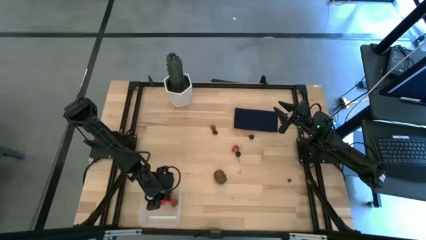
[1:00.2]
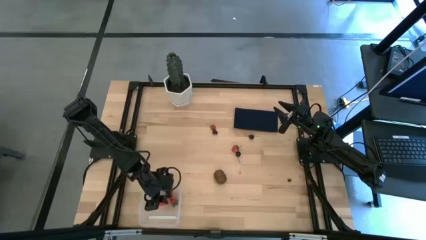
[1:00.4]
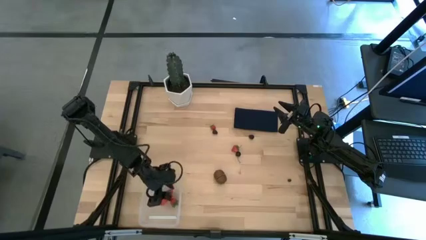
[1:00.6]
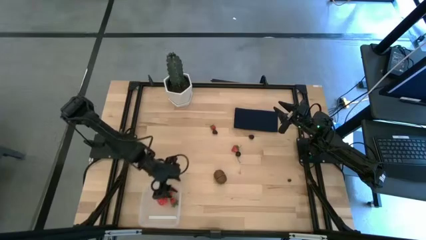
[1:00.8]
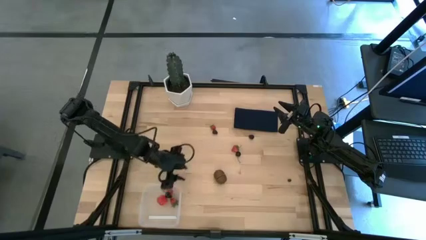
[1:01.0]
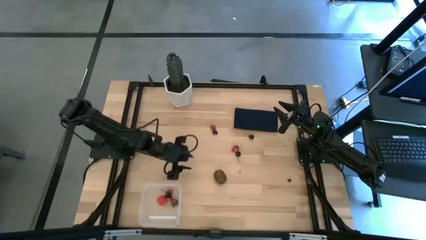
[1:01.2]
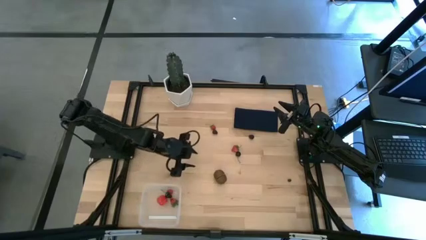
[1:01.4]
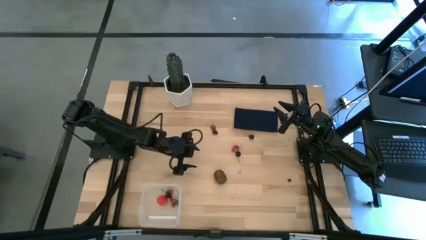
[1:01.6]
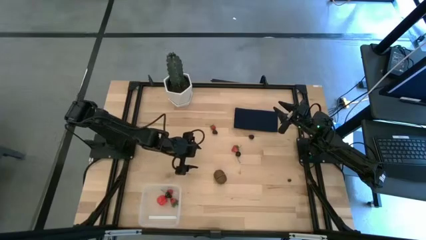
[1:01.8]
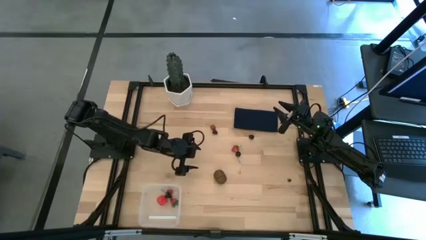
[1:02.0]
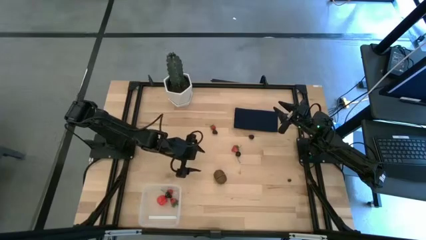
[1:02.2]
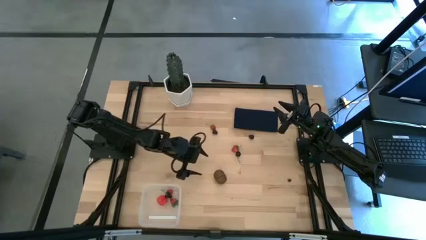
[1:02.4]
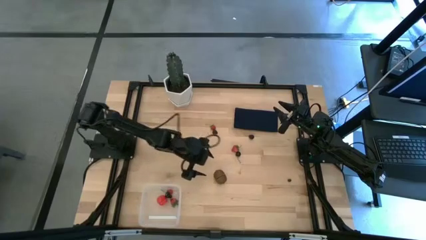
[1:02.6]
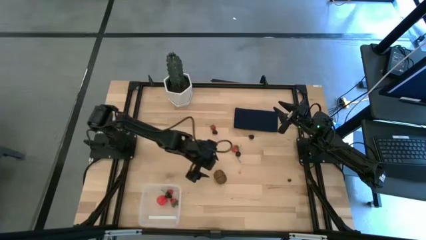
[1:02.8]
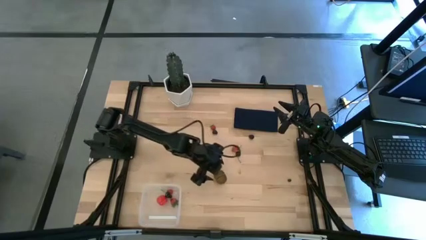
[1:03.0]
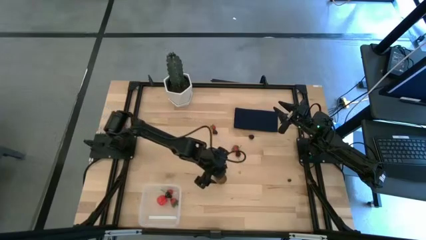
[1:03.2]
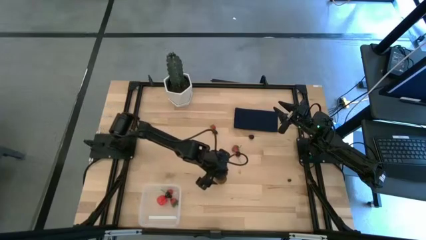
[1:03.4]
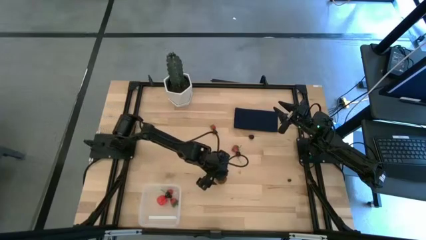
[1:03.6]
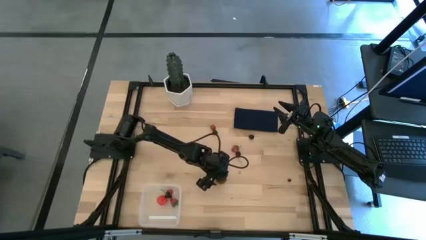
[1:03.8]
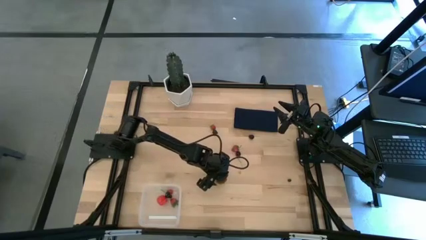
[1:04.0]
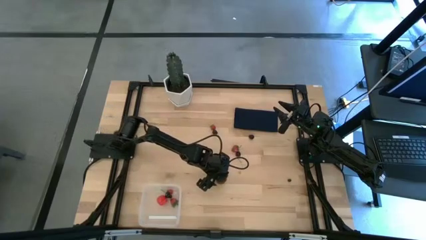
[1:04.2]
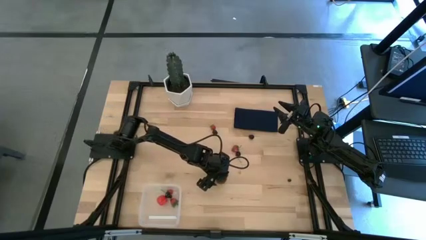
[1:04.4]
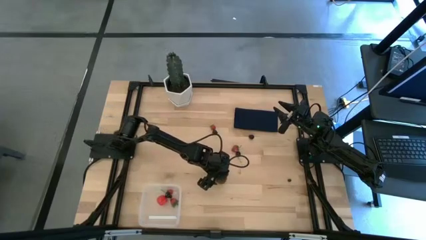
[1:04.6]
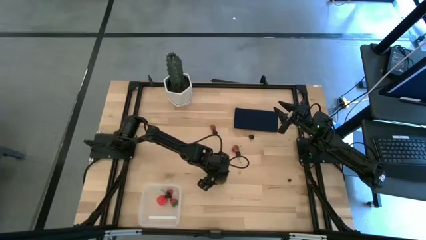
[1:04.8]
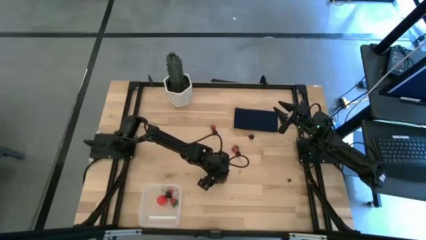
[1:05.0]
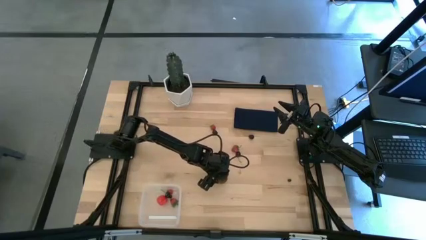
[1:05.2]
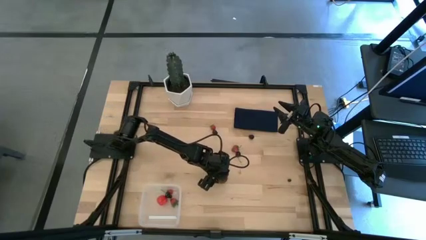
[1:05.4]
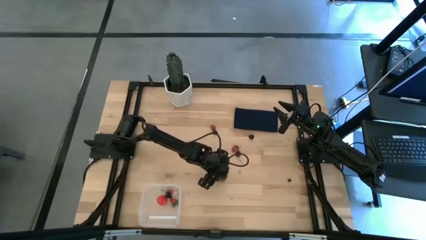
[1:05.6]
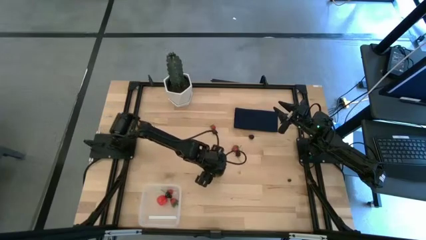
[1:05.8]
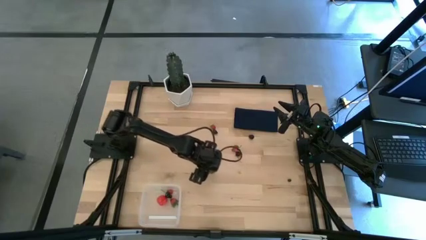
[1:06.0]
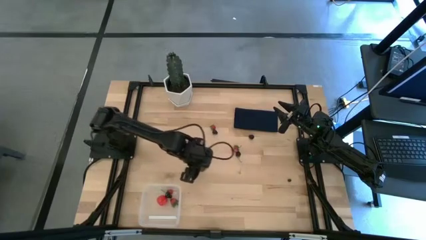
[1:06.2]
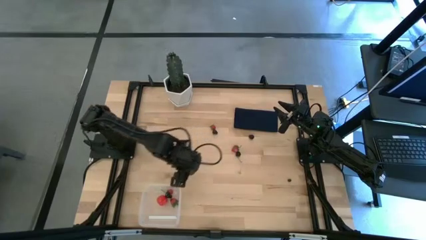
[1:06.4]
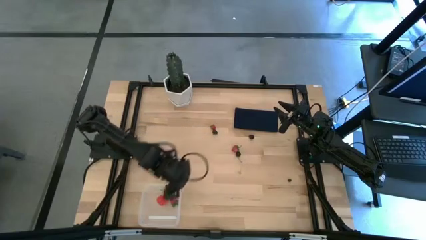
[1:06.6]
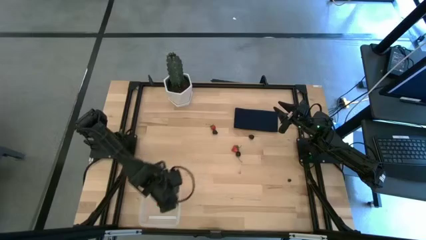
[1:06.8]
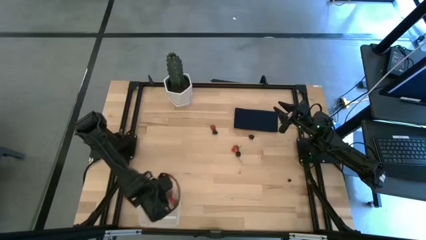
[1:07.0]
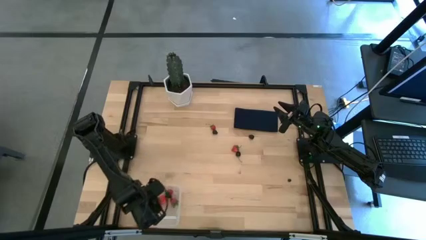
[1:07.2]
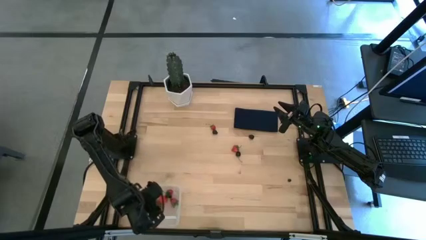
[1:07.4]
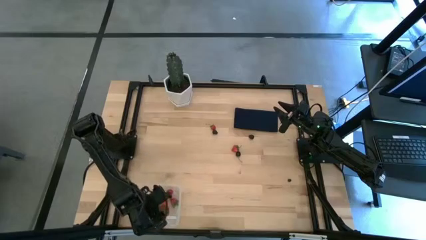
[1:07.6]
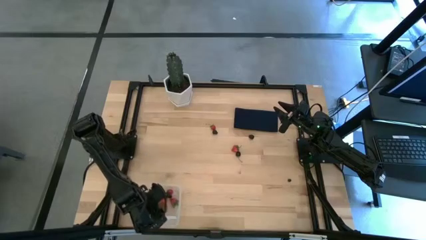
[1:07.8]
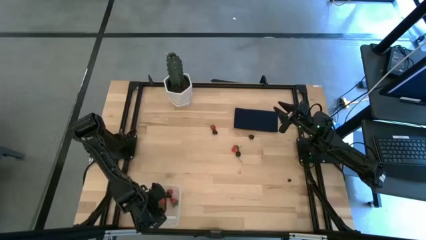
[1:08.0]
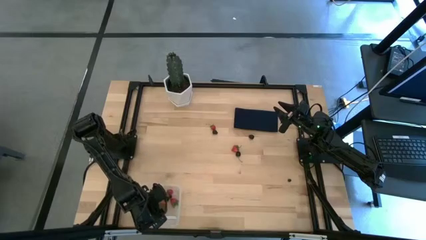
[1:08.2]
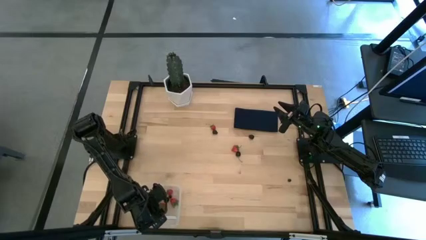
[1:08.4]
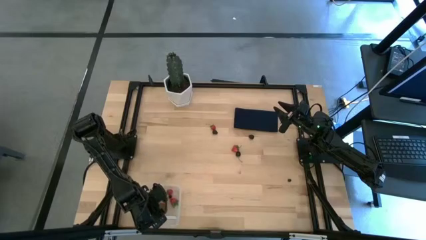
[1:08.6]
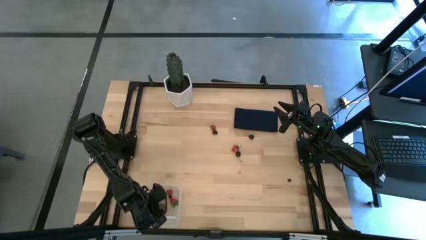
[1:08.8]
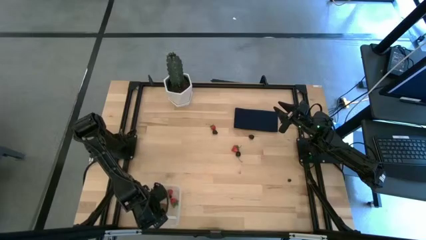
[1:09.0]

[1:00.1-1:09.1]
Task: Pick and placing Produce into tupperware
Put the kiwi in the bin

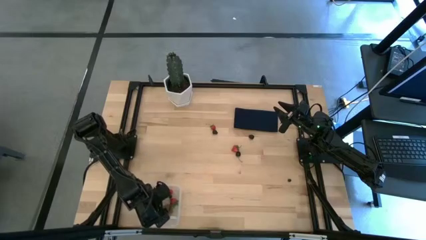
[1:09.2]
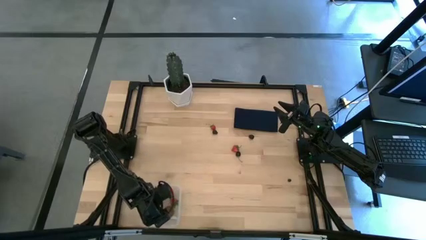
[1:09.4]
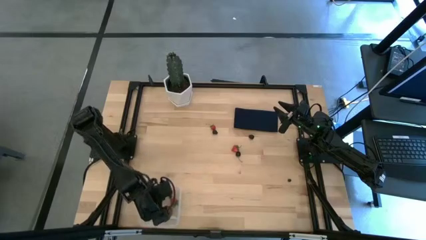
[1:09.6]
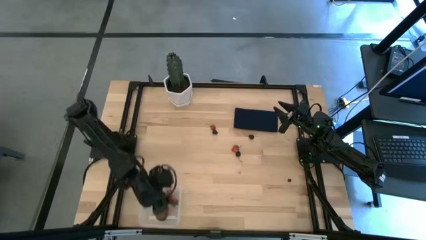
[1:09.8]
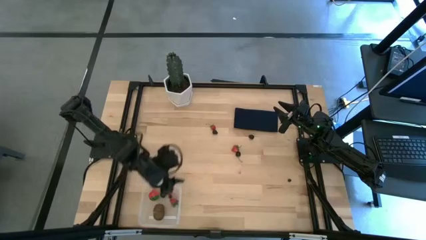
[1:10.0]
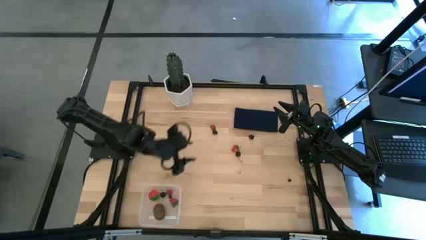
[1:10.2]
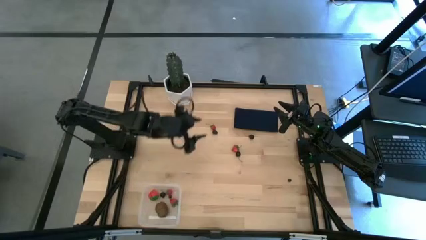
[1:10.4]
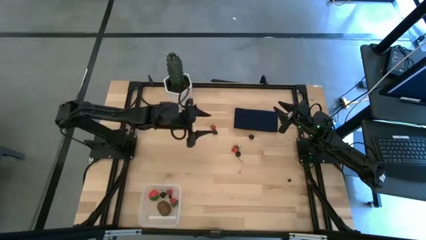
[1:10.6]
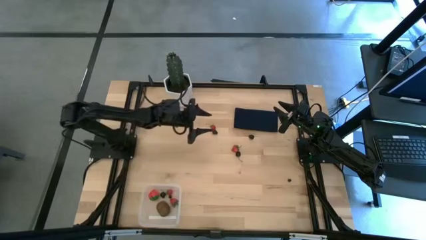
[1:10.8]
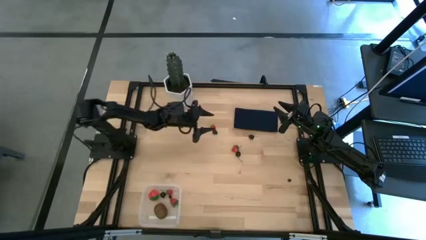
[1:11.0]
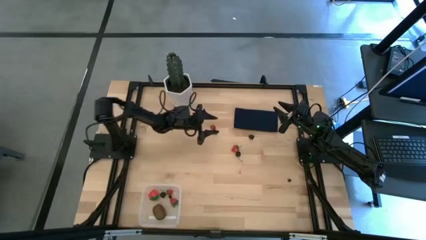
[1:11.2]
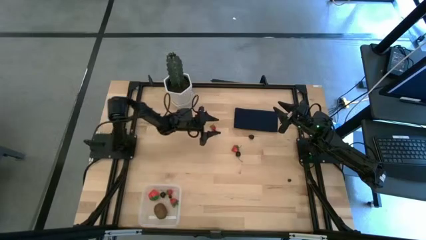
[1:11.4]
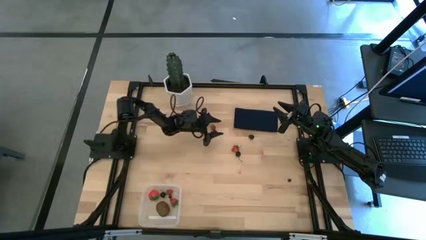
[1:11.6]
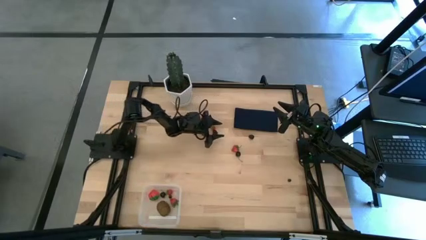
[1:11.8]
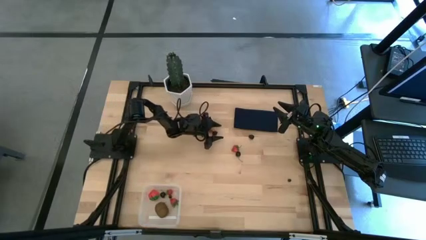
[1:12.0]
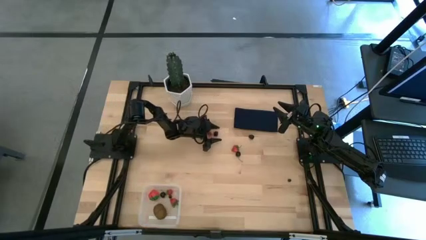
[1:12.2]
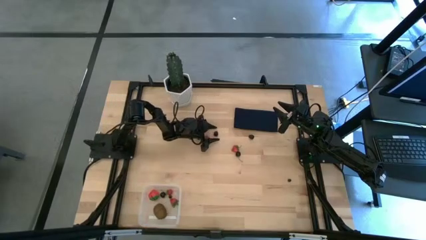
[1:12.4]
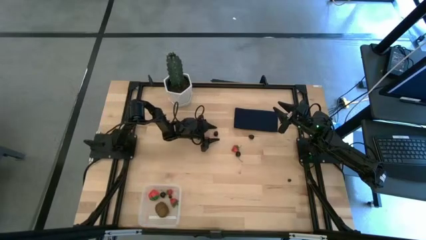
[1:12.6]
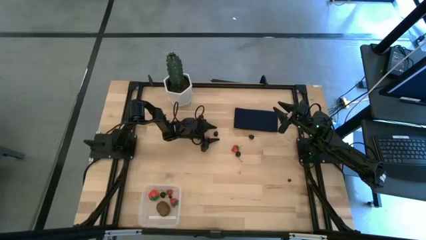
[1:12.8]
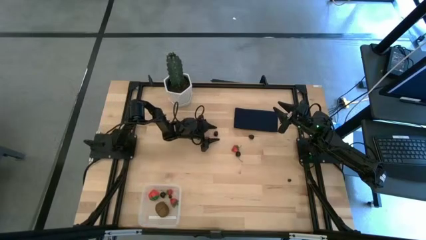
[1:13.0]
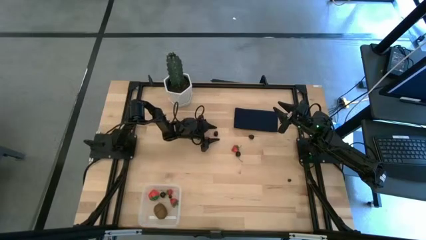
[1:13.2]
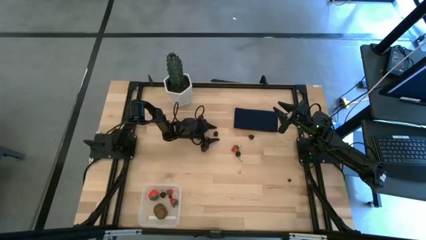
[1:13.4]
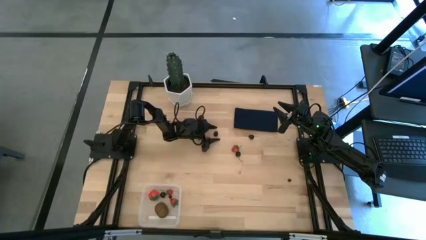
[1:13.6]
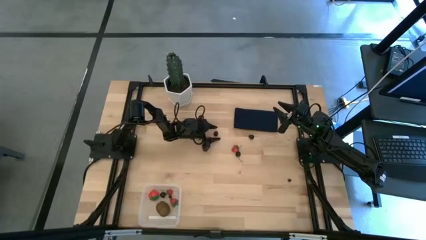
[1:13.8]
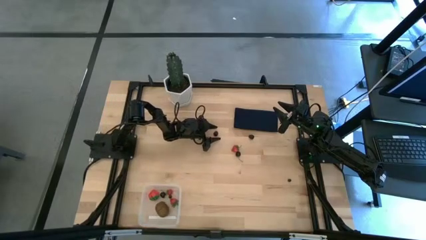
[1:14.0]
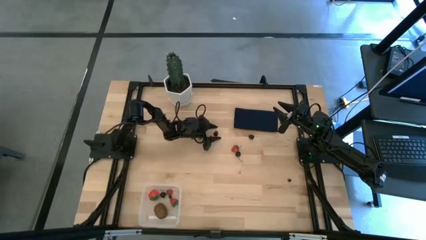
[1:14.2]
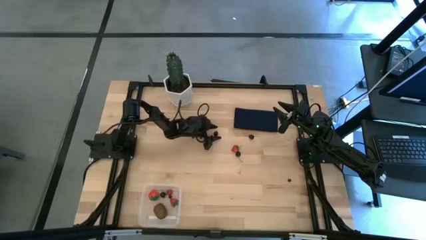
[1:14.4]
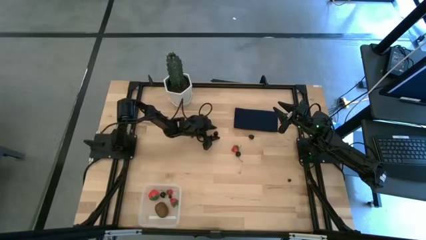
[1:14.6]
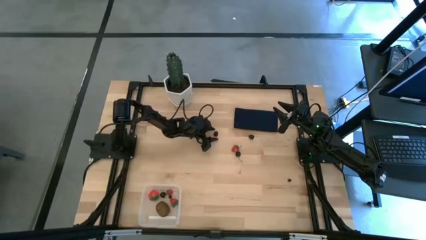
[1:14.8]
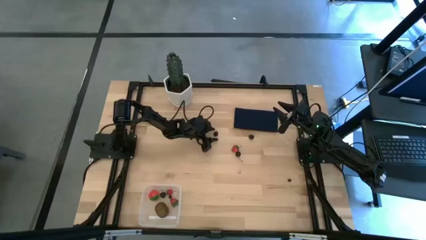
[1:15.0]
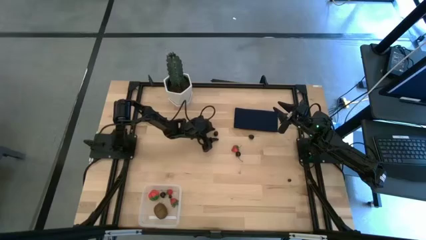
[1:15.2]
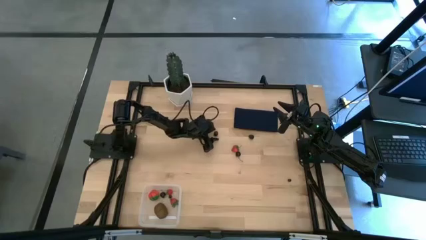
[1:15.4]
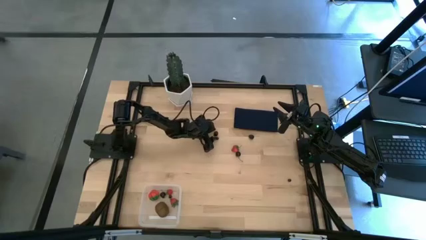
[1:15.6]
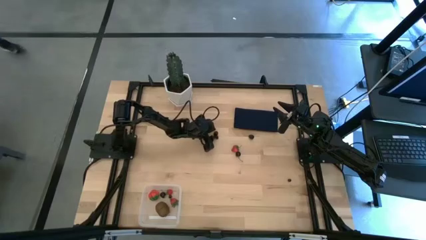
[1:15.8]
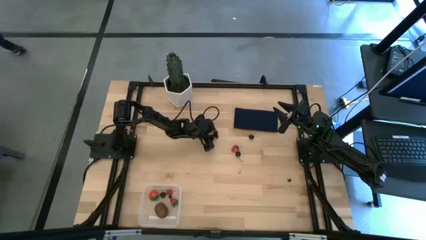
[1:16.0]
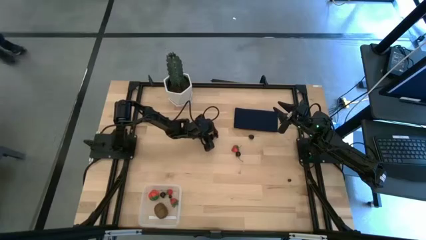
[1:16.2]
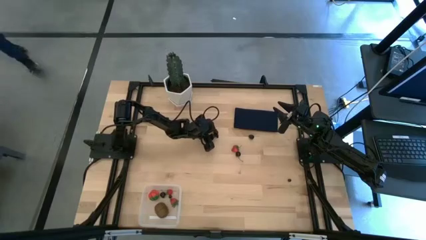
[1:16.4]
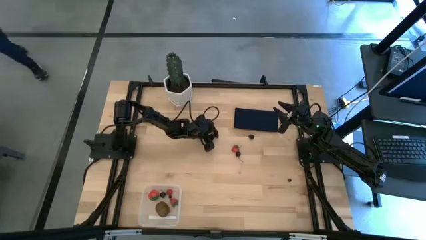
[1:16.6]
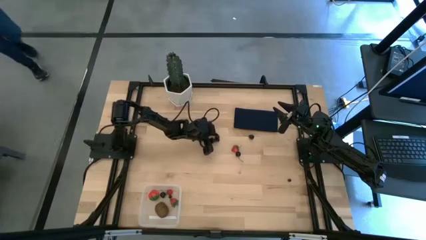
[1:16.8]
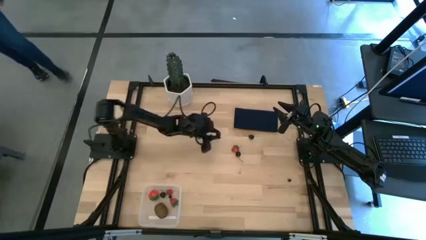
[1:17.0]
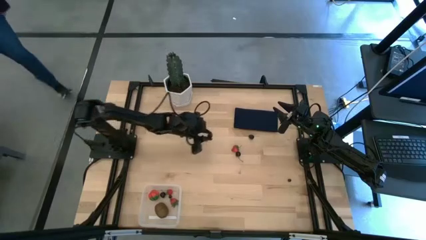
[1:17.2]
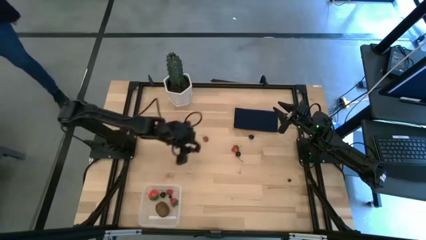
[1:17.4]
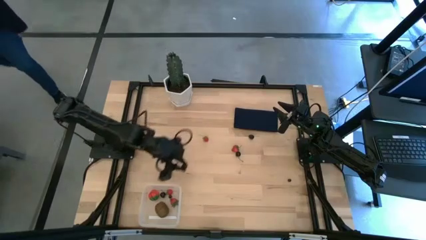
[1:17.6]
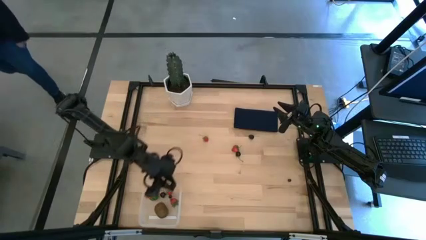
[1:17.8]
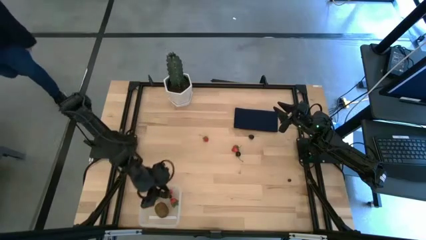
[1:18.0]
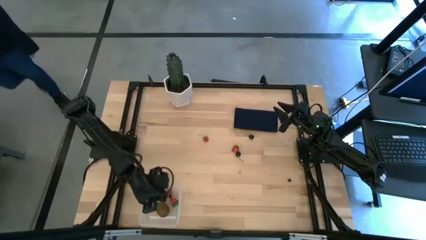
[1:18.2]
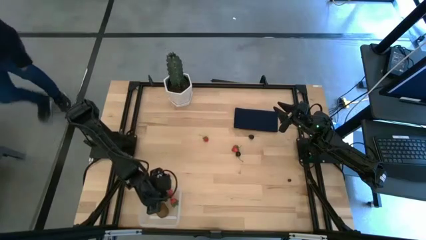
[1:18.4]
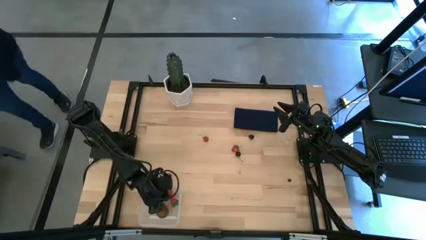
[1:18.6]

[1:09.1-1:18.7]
Put the blackberry in the transparent bin
